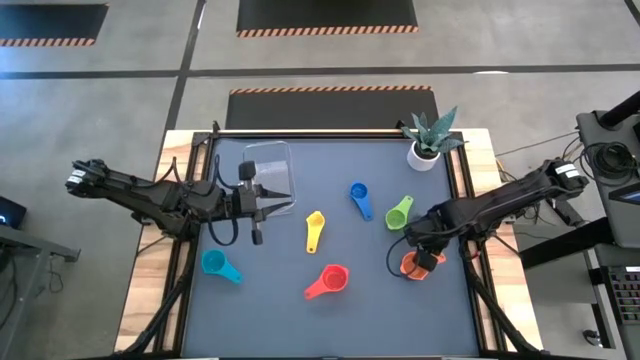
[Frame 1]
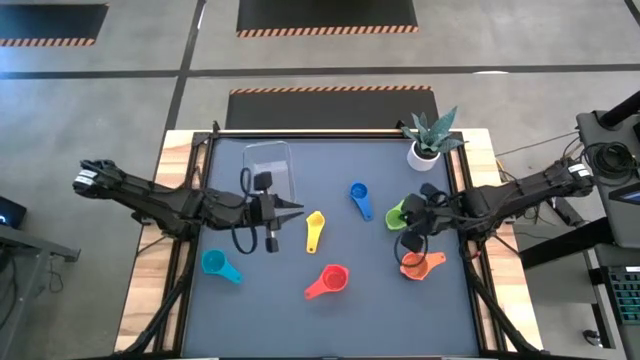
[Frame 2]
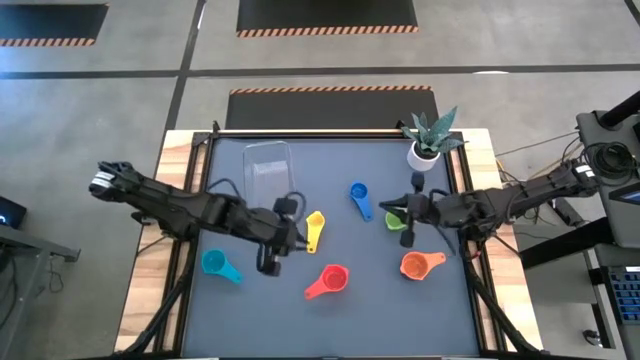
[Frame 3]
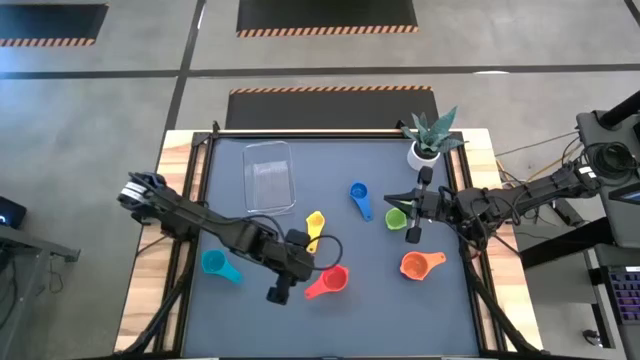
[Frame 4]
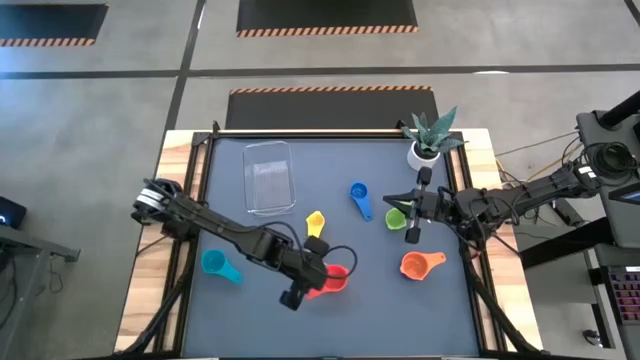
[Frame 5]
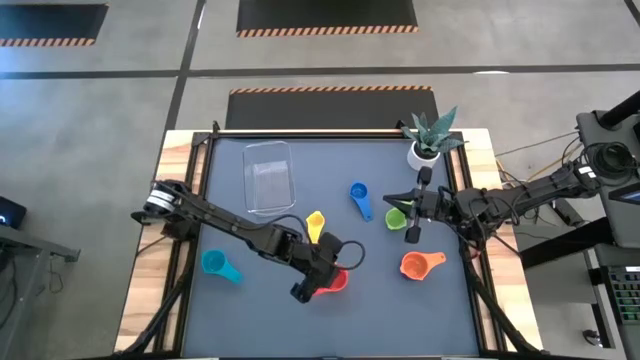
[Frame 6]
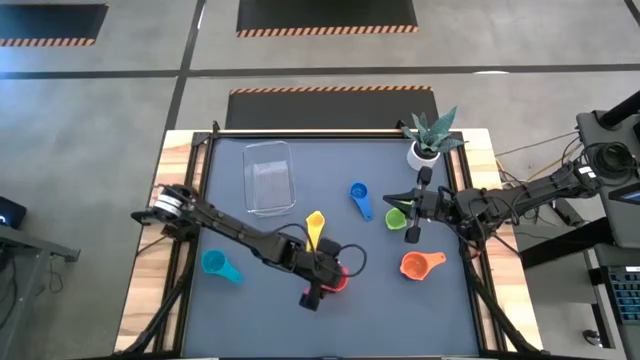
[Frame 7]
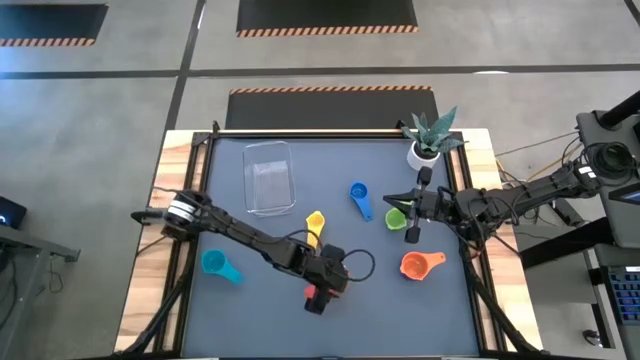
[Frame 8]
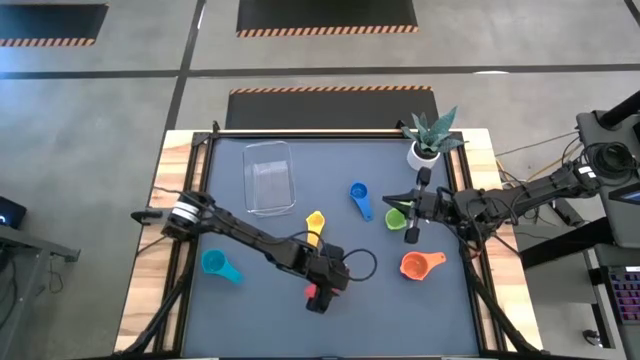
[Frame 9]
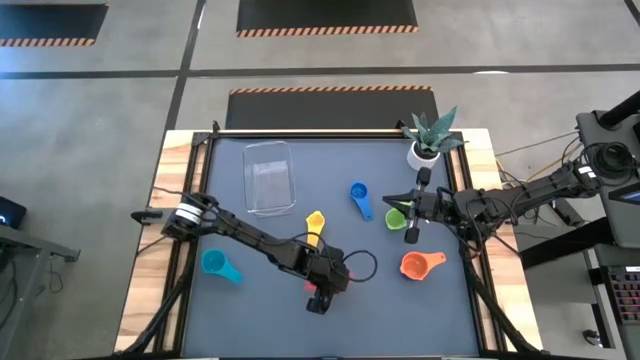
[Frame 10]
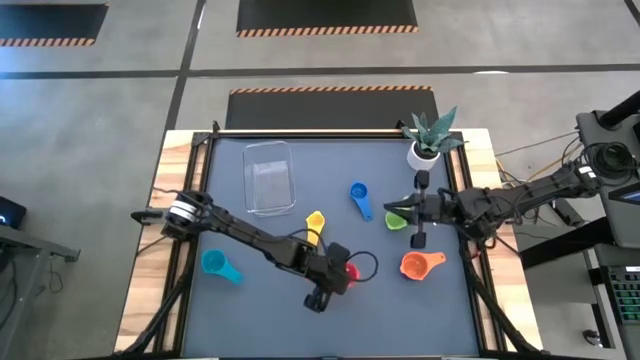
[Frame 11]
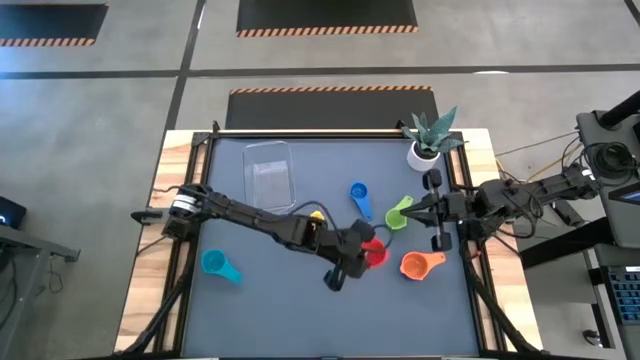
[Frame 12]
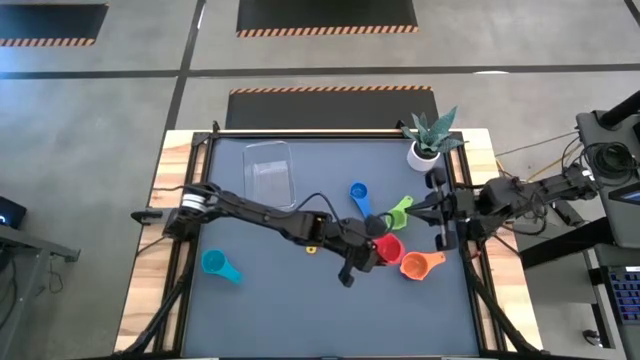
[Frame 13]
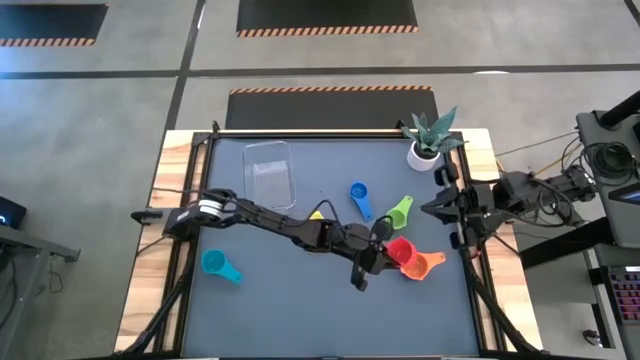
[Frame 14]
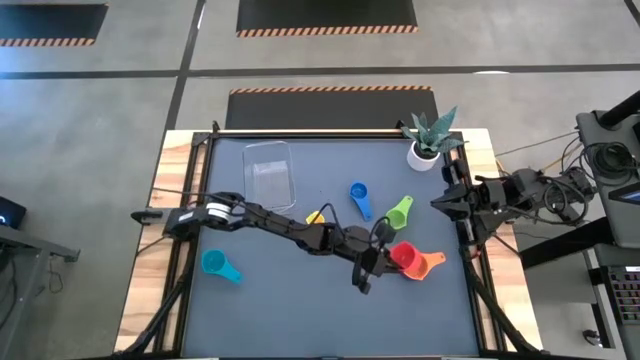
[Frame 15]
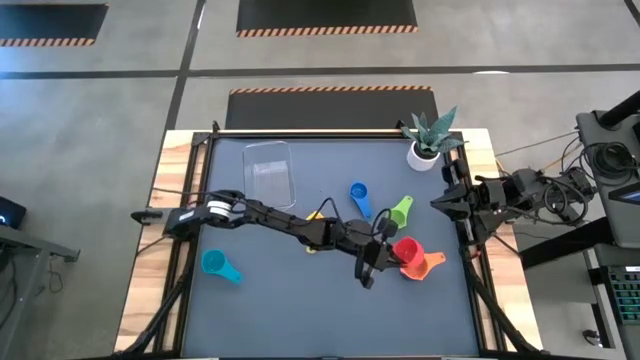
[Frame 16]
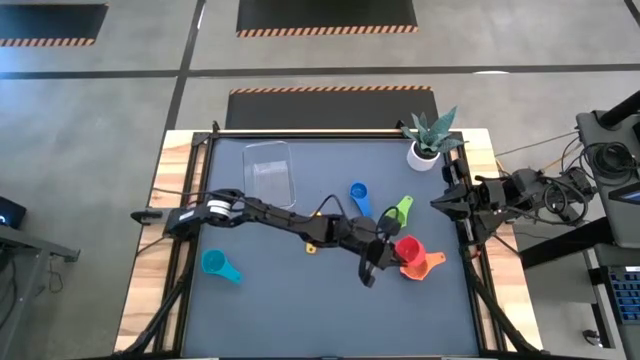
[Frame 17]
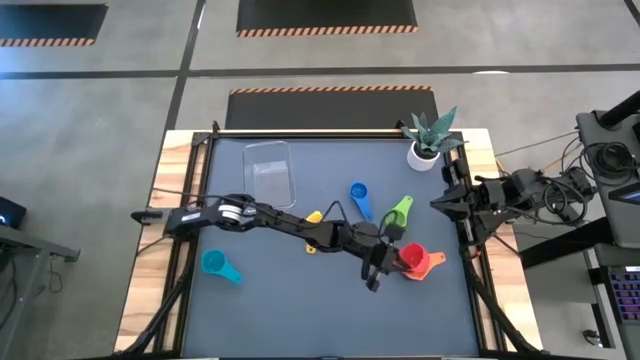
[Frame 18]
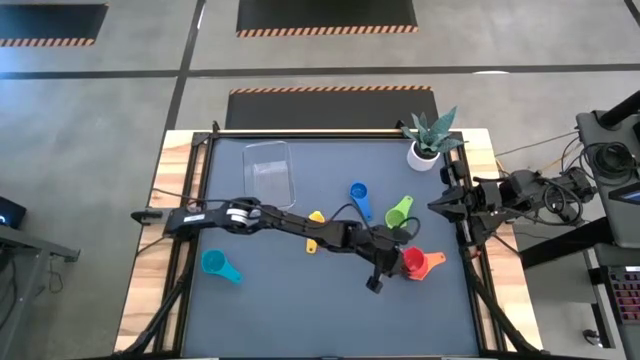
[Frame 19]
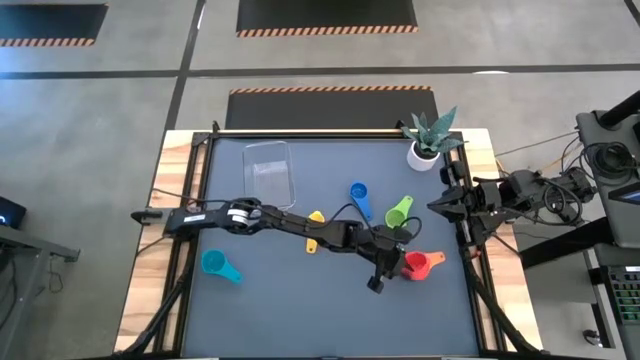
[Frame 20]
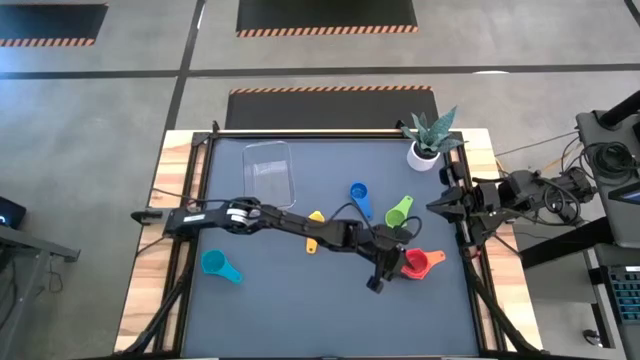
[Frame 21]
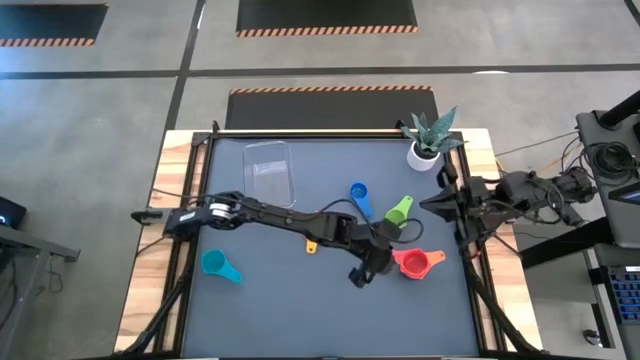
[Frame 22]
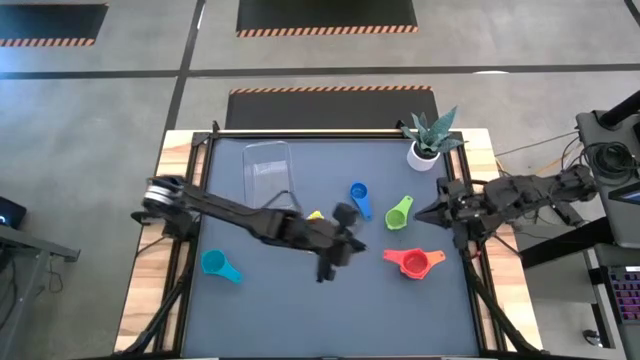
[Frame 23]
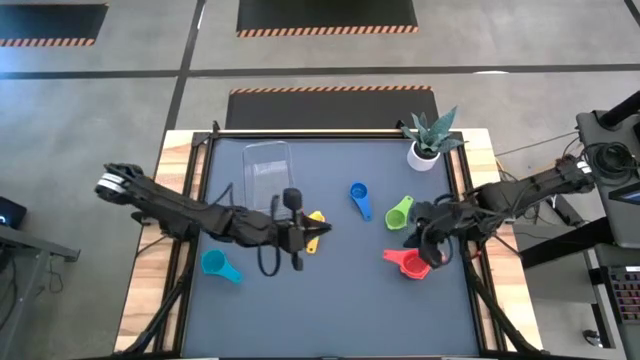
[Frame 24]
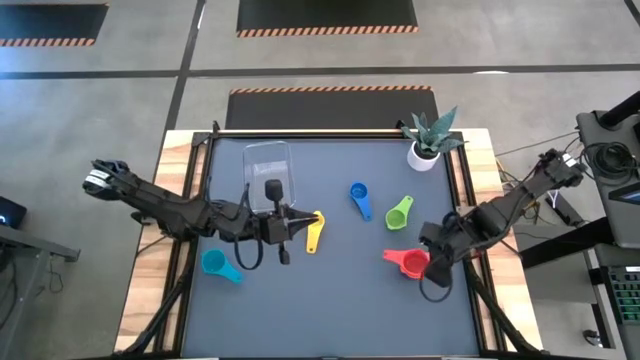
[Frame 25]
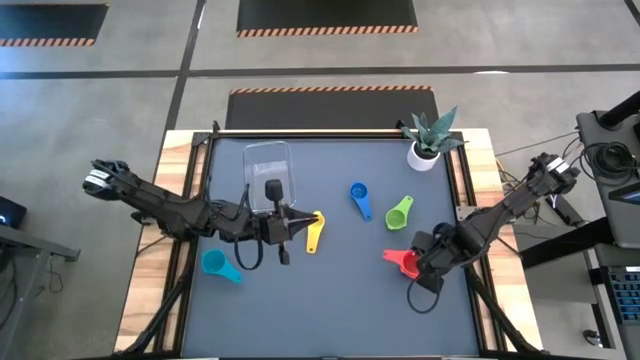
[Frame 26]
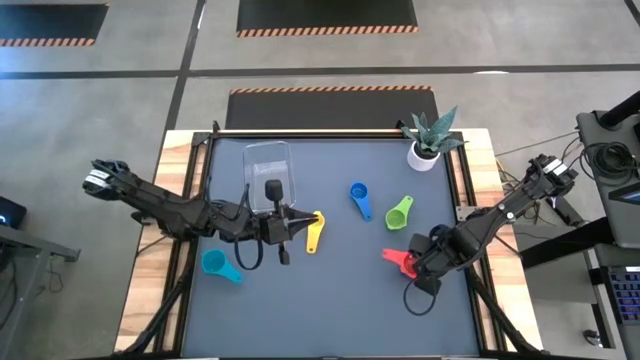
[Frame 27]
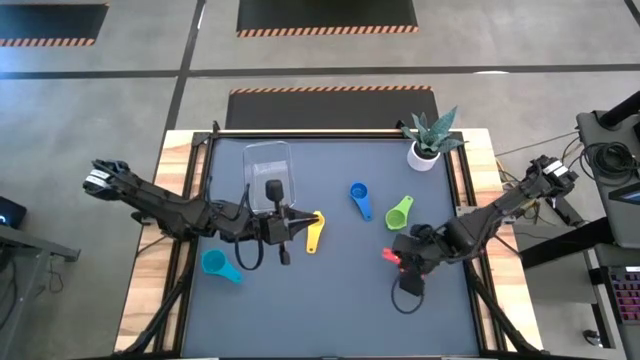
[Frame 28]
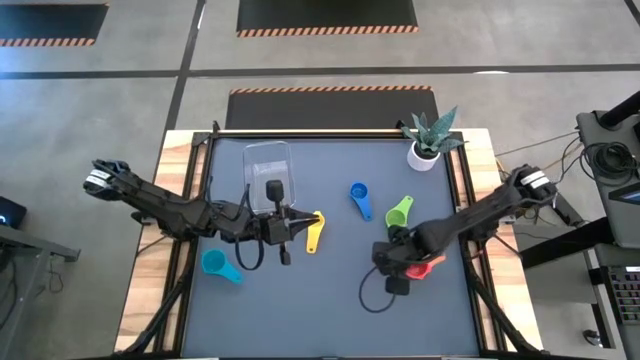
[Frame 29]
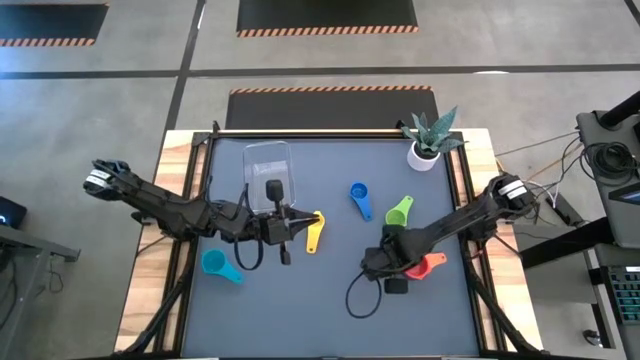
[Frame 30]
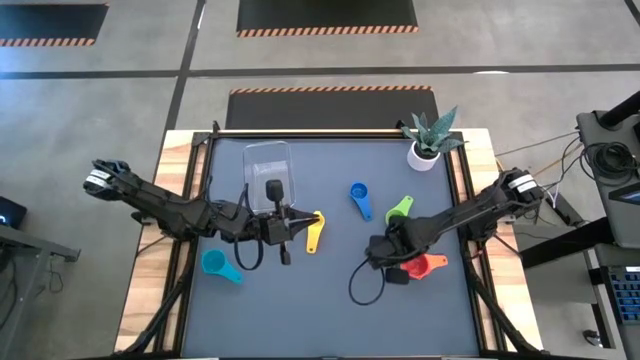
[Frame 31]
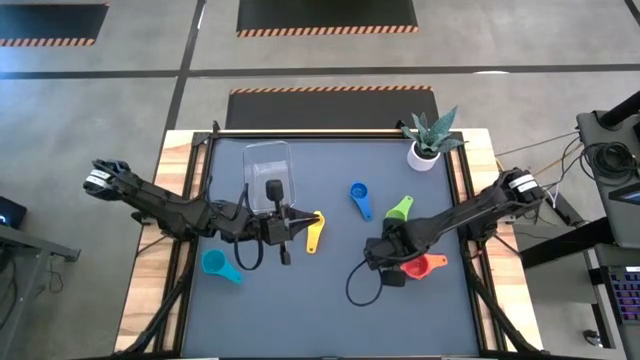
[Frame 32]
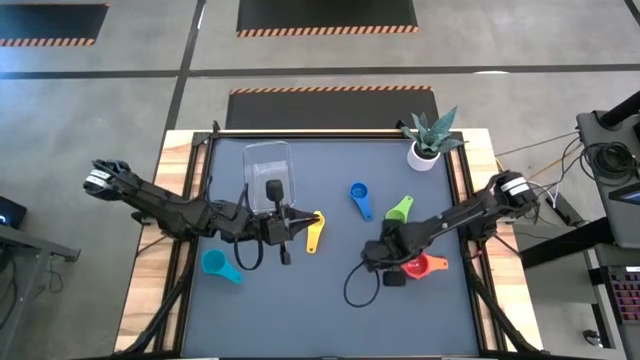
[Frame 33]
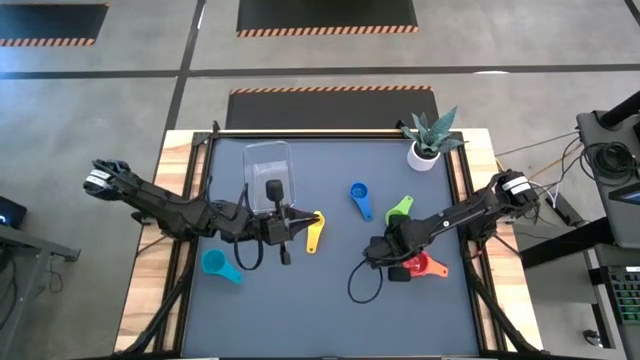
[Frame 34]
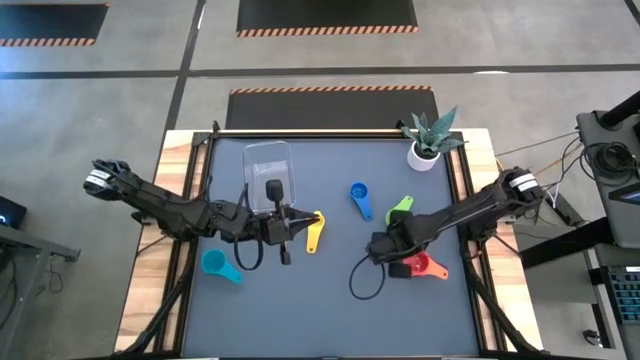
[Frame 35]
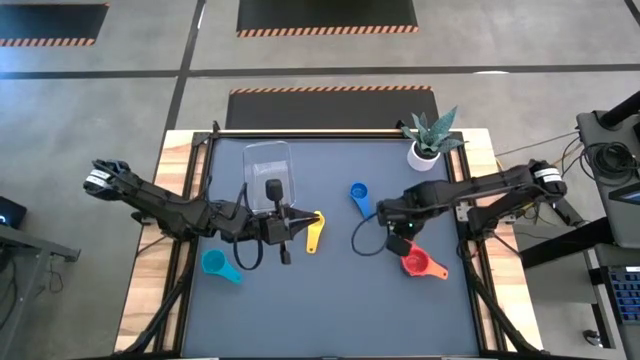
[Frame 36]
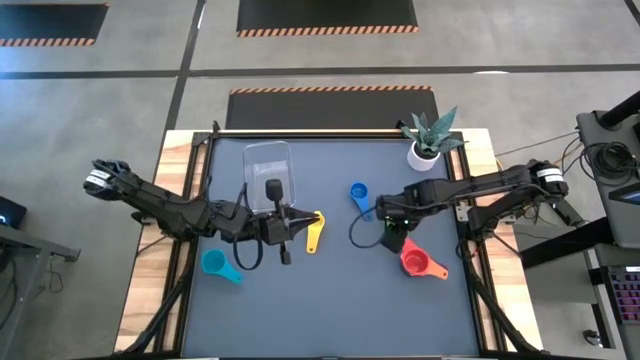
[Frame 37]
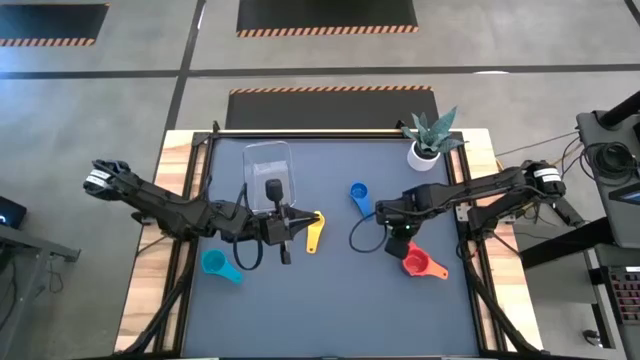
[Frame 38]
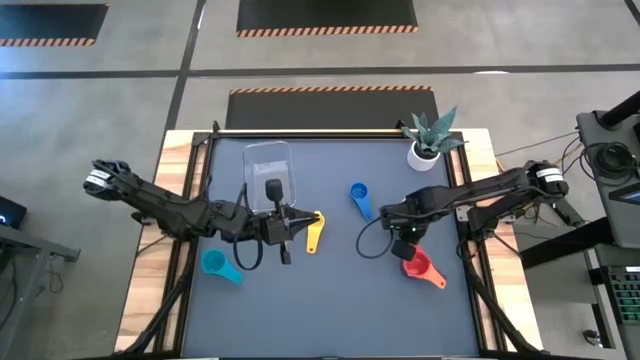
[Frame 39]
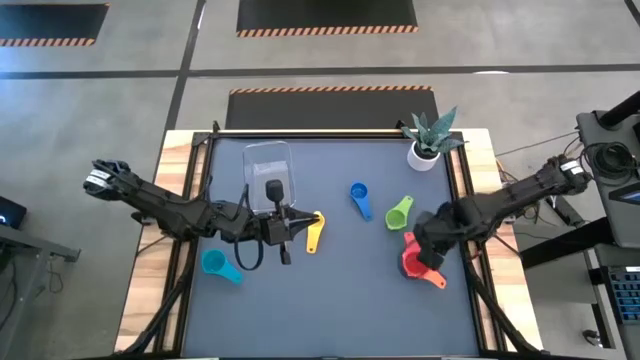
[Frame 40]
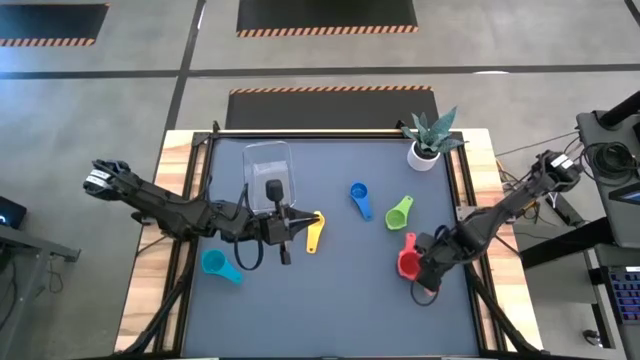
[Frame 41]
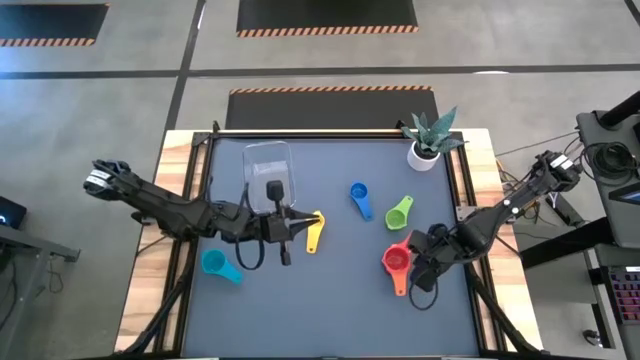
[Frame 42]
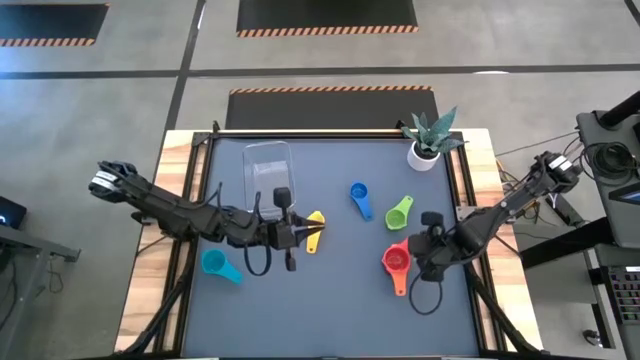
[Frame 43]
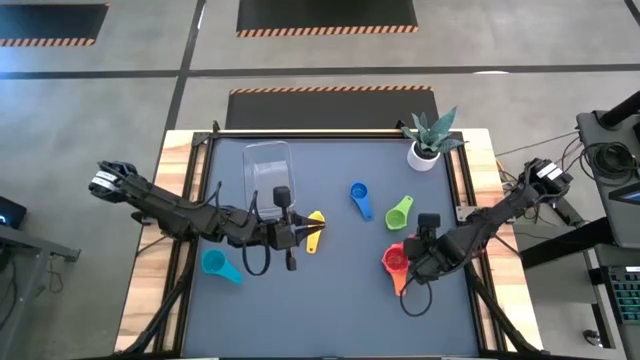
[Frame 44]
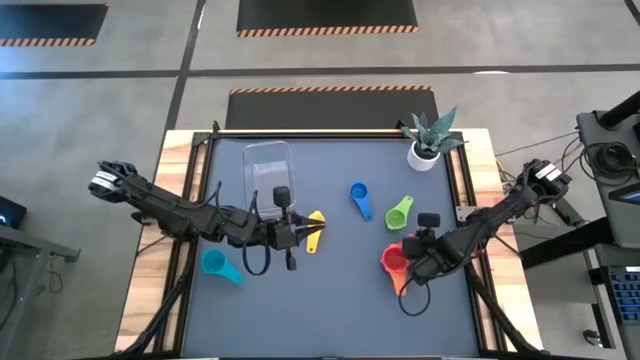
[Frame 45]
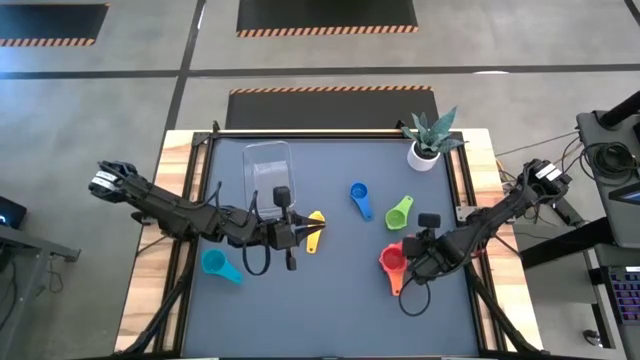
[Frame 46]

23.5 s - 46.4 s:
Task: Nest measuring cups in basket
Stack the red measuring cup on top of the orange measuring cup
